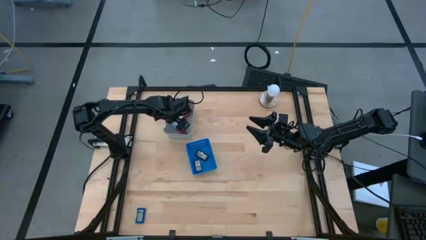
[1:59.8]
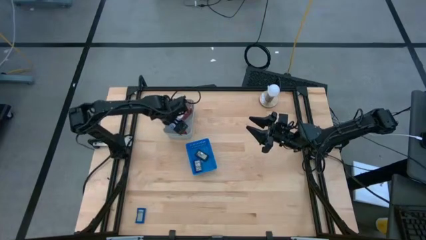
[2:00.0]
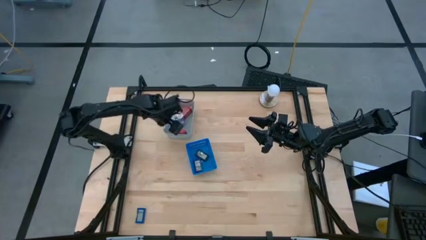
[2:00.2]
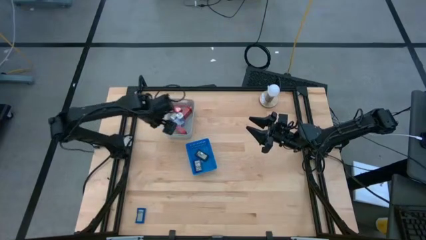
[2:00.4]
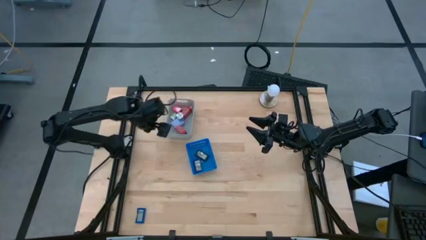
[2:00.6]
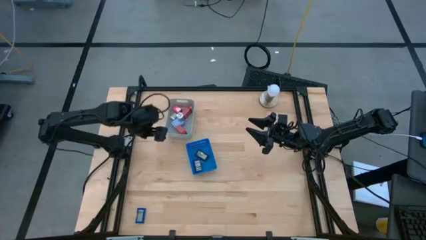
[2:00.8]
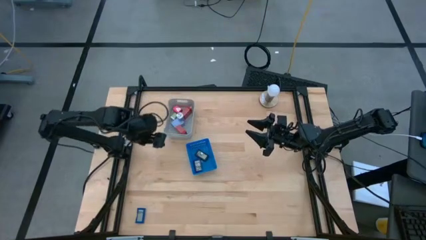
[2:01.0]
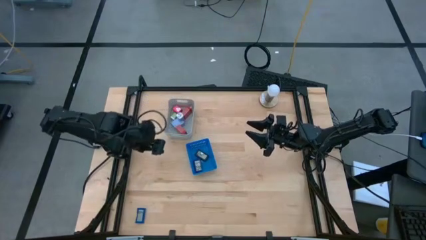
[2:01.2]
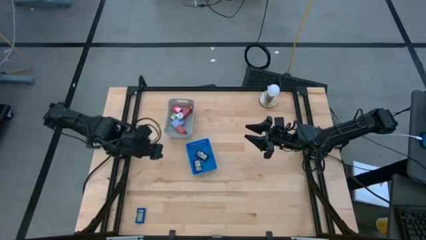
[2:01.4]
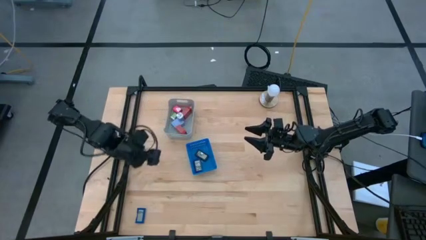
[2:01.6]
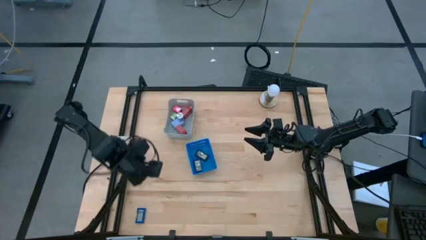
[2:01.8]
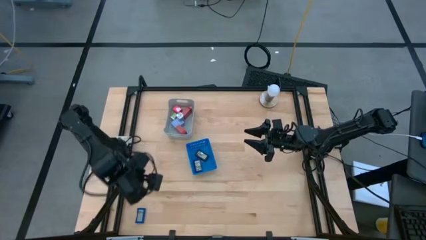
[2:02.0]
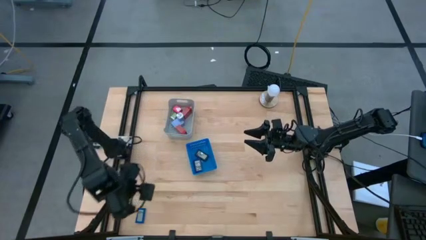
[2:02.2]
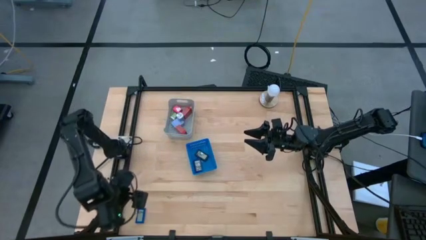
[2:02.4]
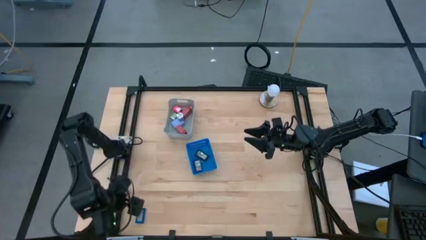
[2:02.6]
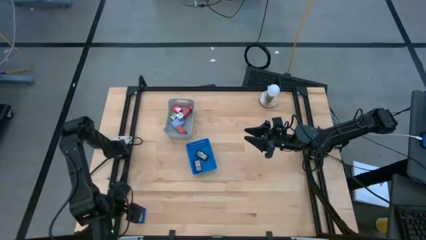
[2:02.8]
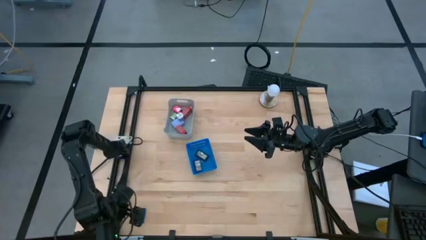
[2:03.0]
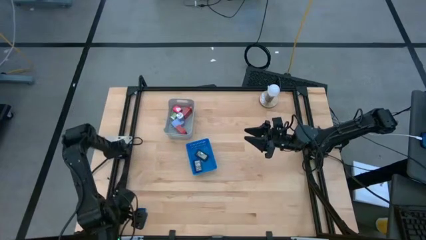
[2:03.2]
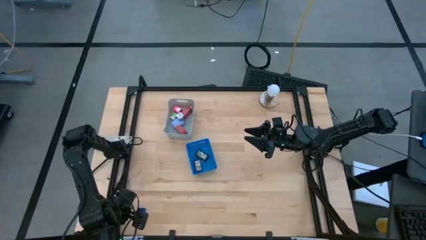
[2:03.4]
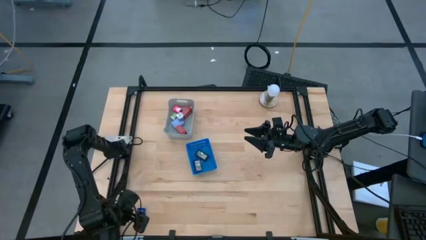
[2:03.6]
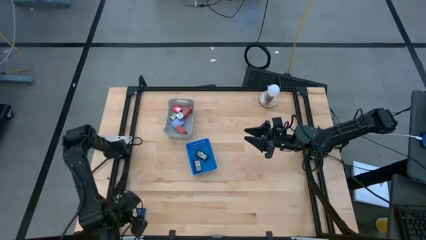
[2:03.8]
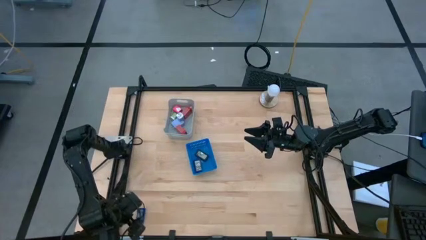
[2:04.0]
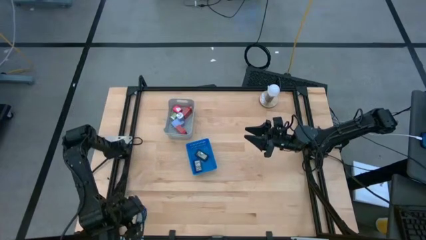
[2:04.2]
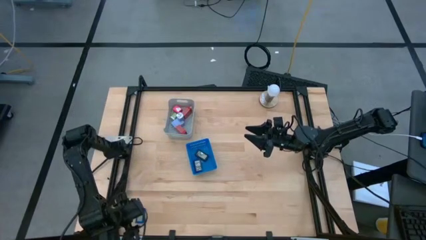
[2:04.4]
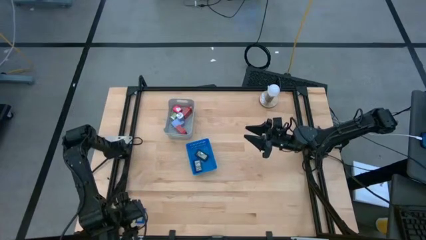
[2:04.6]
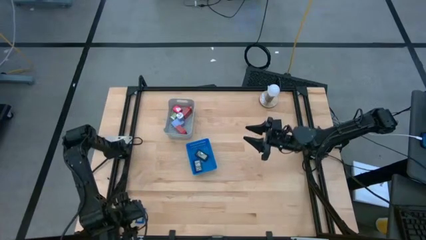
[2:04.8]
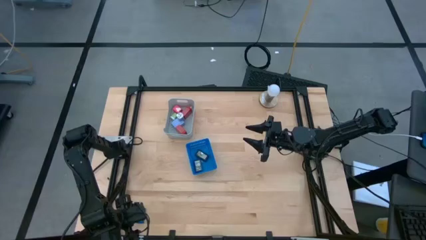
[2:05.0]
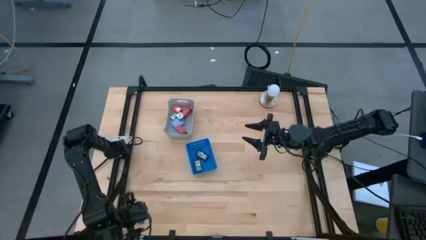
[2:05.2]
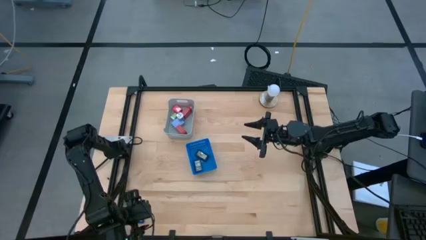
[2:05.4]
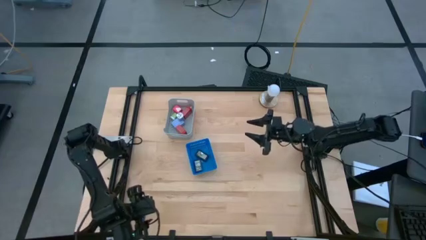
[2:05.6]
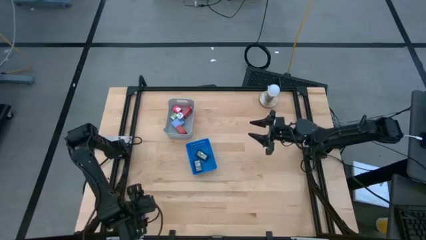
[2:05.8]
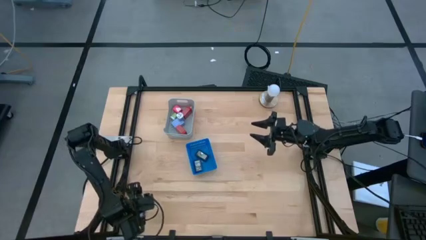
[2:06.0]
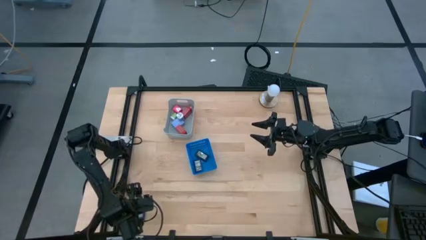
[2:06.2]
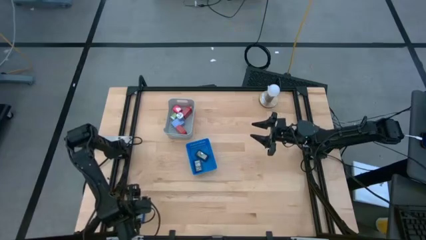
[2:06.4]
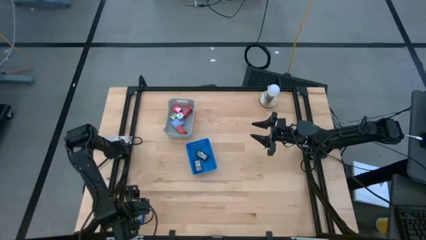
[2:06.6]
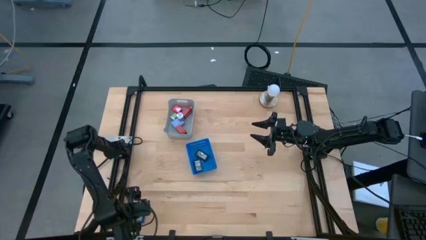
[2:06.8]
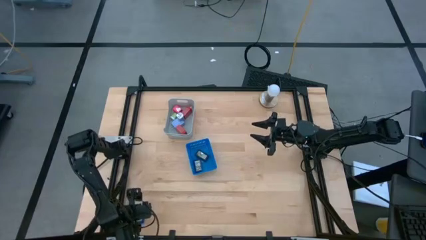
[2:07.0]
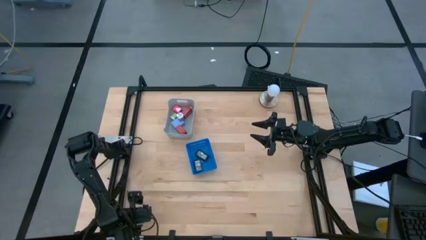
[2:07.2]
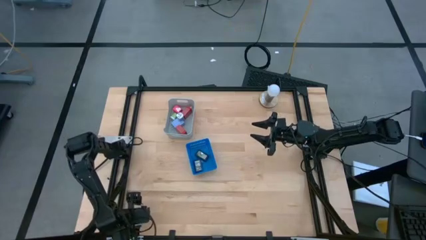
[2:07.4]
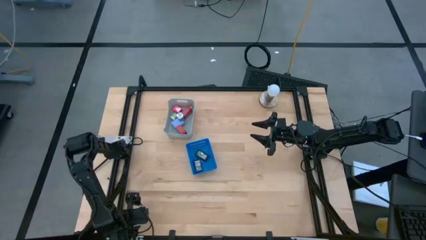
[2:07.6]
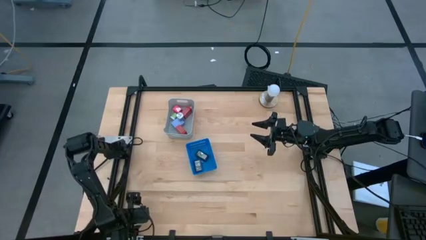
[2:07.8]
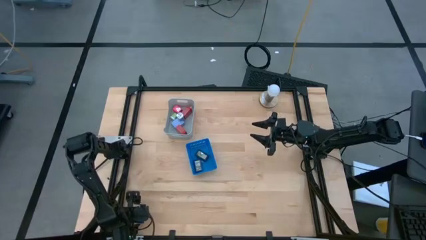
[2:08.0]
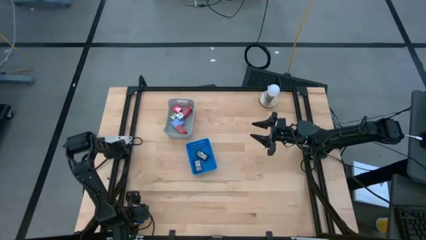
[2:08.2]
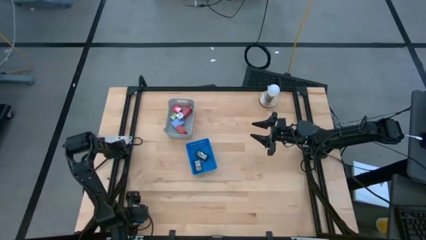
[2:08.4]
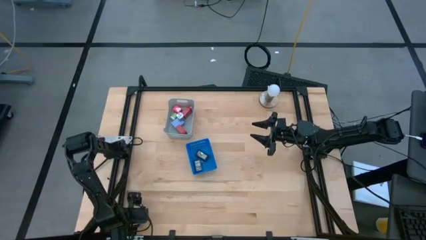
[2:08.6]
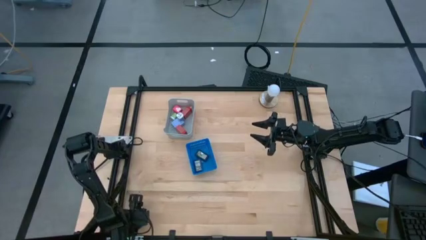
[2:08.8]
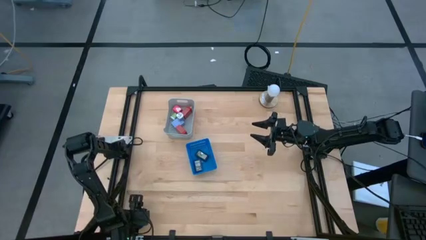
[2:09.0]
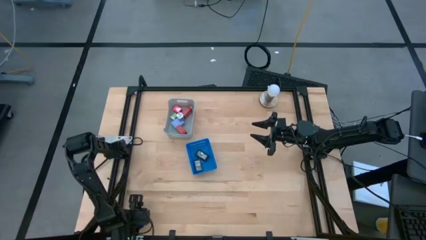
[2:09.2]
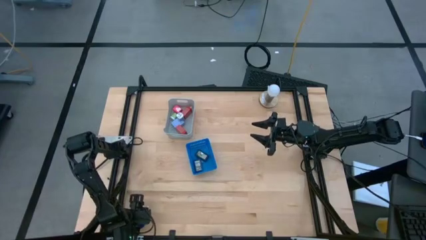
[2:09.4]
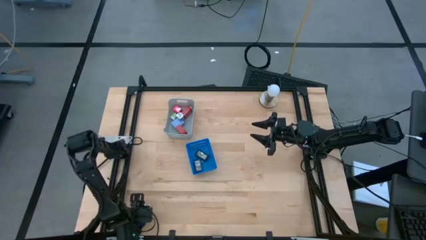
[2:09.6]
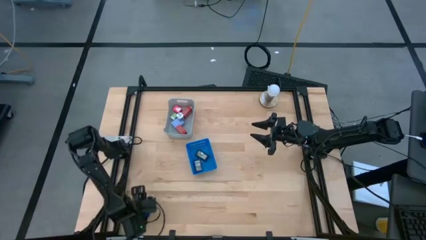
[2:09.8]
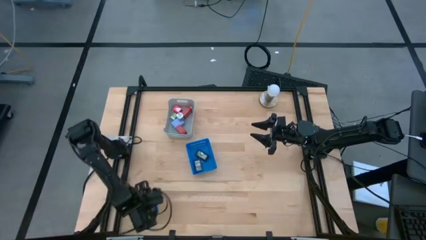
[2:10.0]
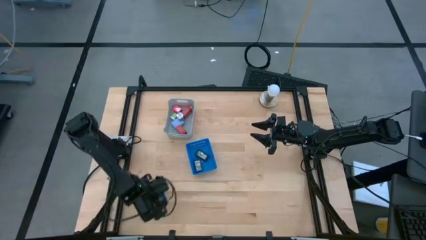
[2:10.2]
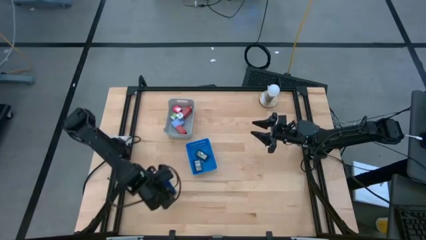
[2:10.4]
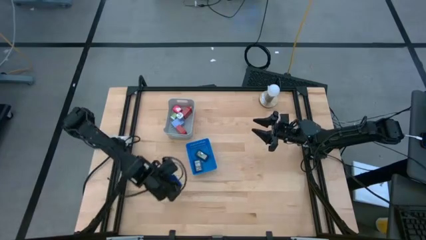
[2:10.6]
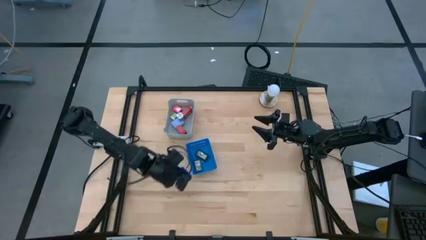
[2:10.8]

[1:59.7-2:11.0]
Task: Pick & Place Office items
Put the blue digital timer into the blue basket

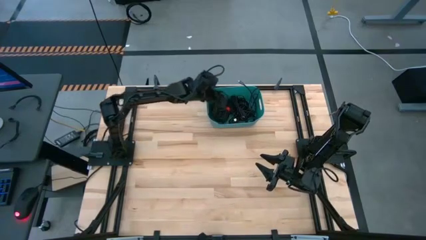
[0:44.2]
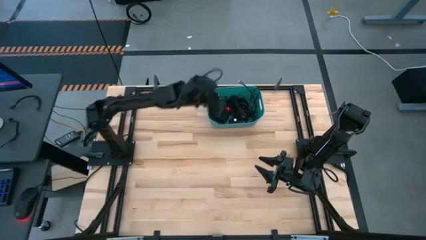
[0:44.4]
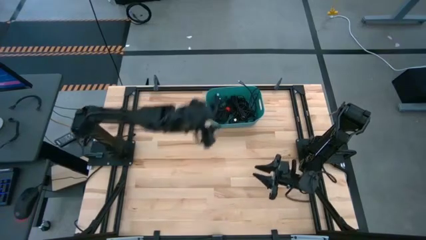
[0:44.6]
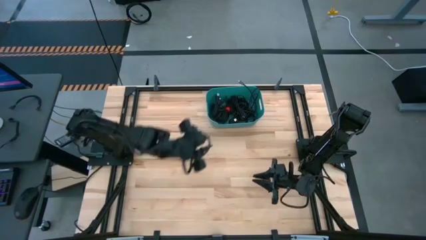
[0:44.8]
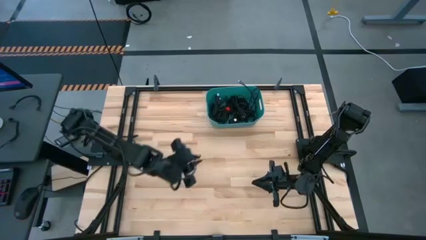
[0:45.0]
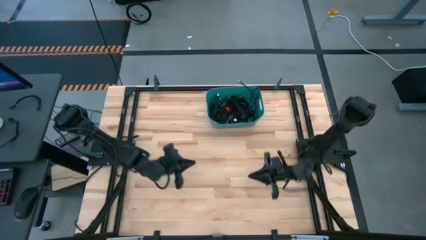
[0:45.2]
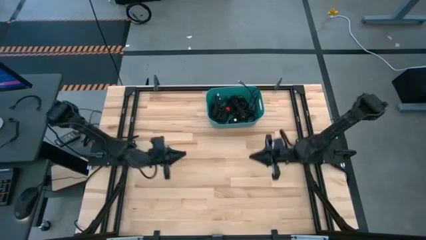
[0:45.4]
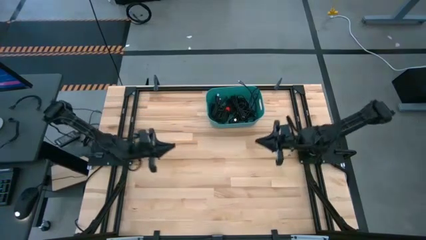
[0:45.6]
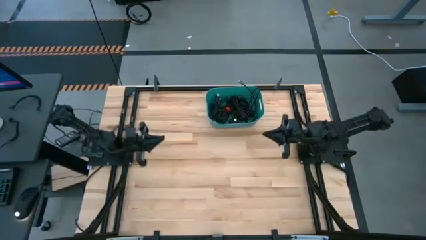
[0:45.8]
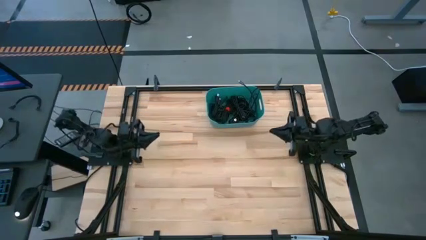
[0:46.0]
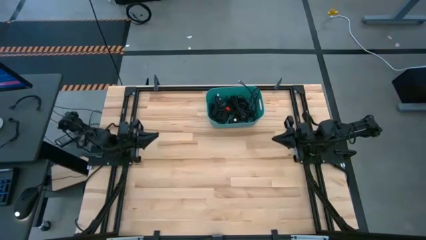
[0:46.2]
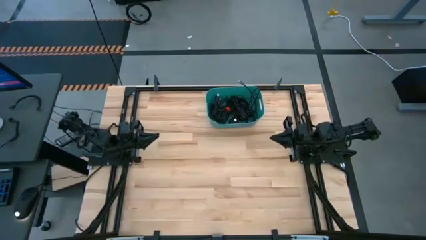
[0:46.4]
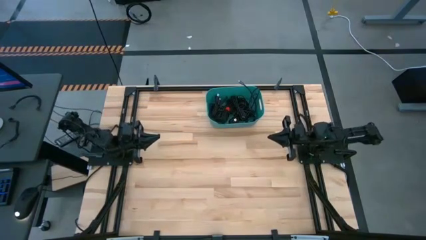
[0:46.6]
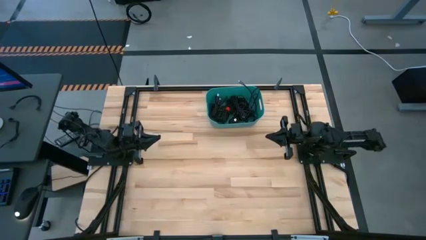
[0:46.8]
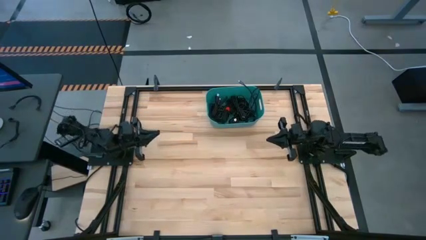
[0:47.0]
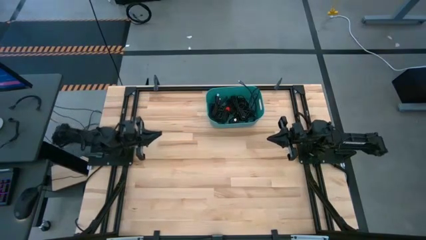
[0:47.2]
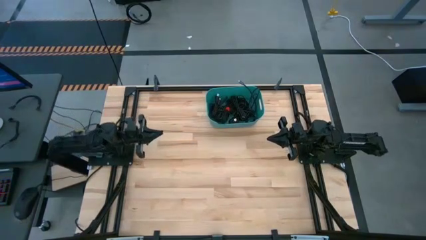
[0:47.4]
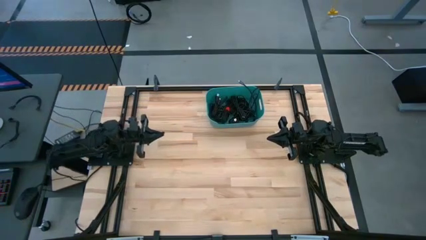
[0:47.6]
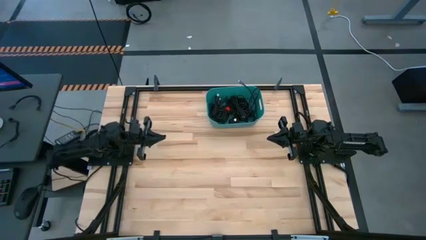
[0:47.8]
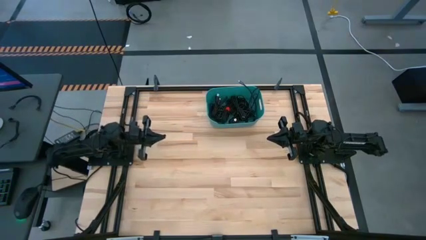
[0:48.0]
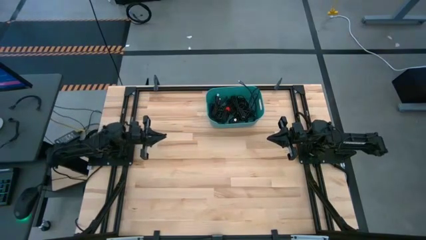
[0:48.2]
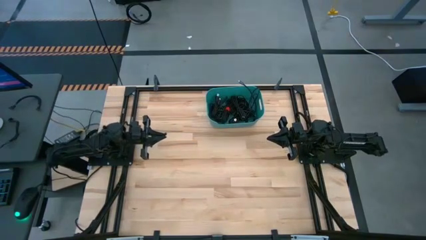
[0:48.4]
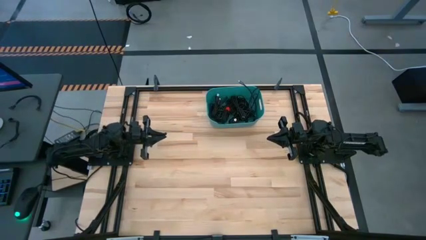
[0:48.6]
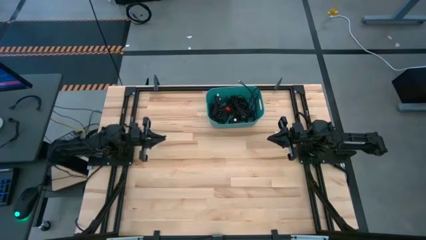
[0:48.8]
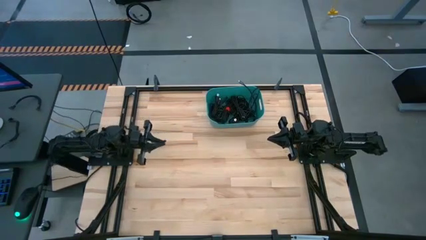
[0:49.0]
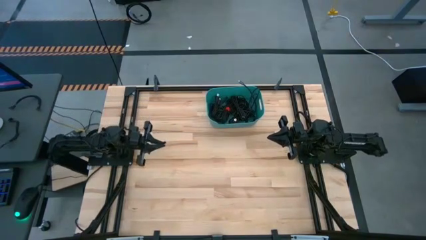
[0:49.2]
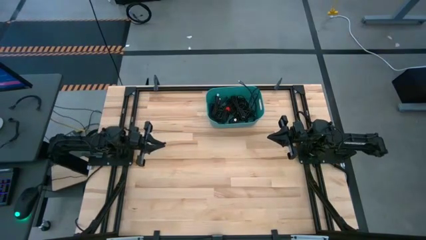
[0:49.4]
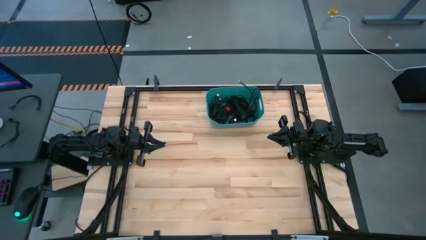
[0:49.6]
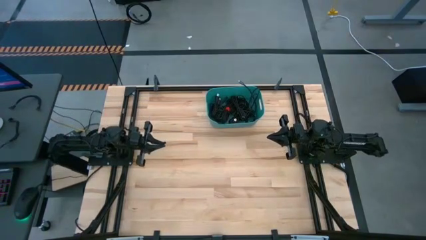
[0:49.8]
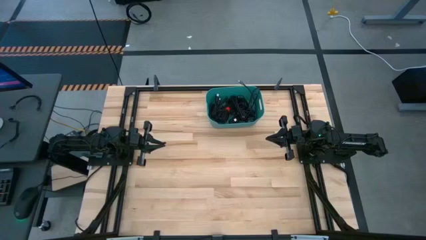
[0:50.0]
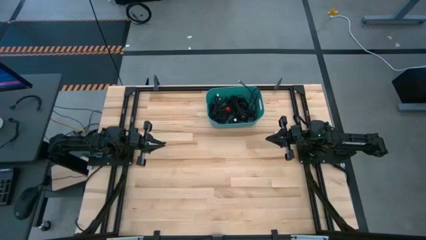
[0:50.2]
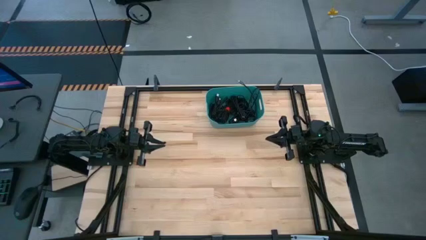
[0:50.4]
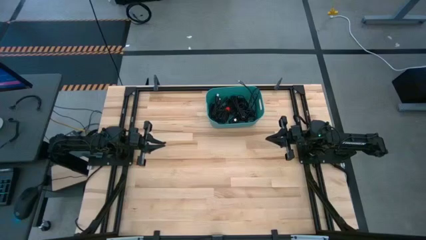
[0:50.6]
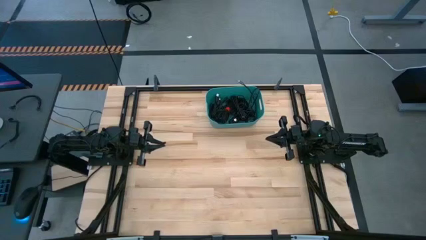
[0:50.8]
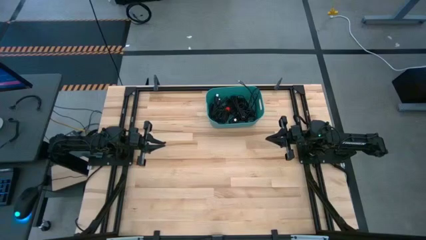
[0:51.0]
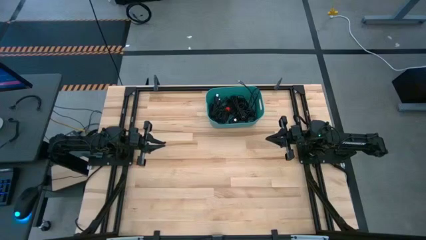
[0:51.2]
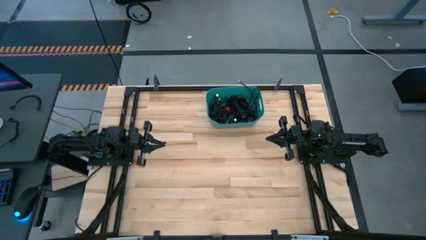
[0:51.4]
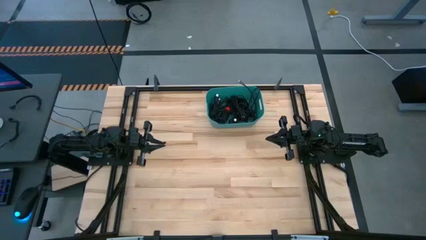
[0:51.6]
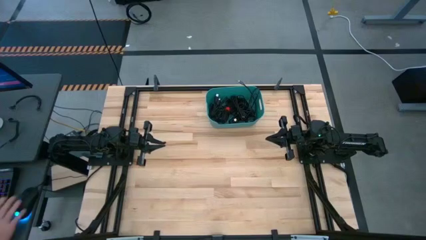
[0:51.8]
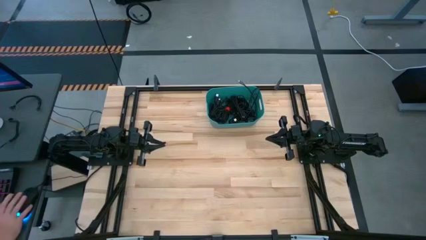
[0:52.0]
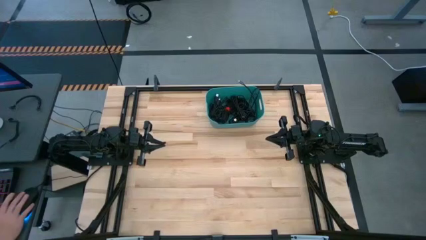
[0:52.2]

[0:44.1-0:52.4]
Task: Pick and place USB-C Cables
Return to Home Position
